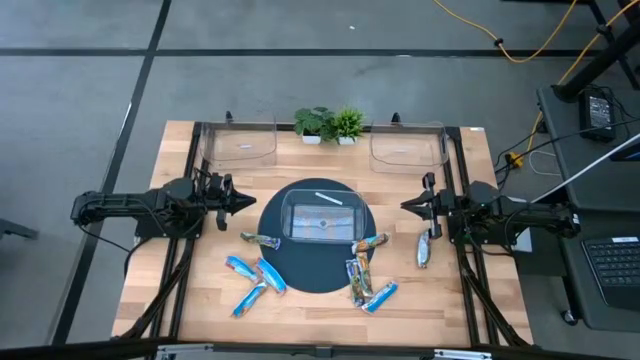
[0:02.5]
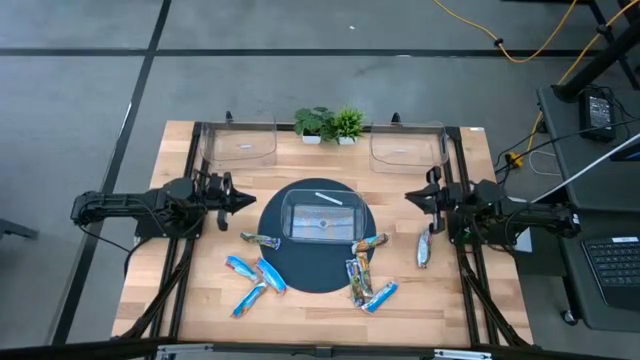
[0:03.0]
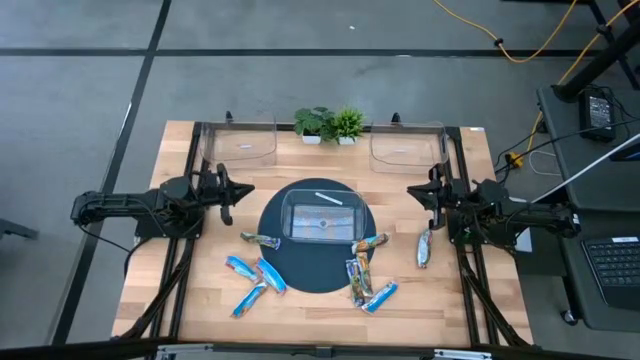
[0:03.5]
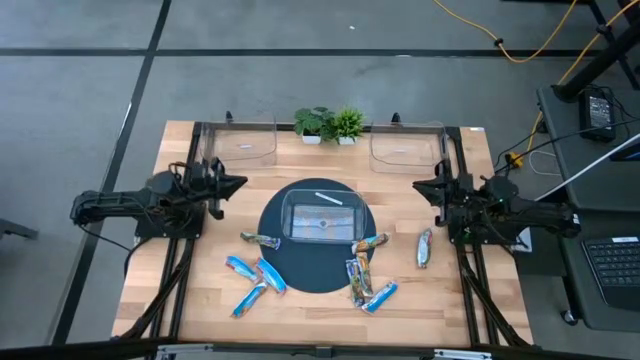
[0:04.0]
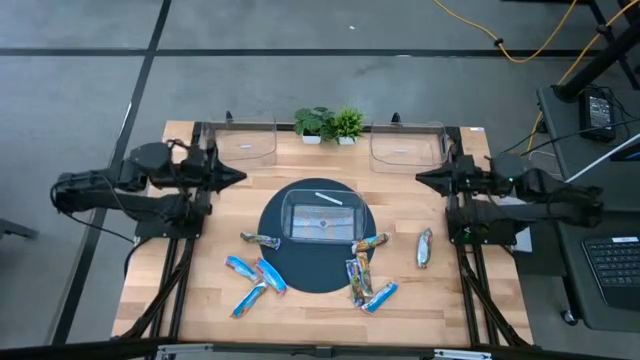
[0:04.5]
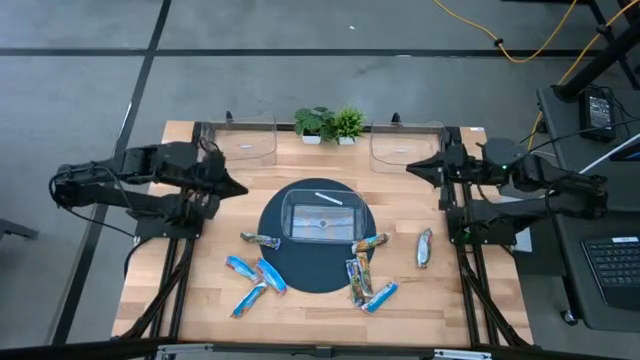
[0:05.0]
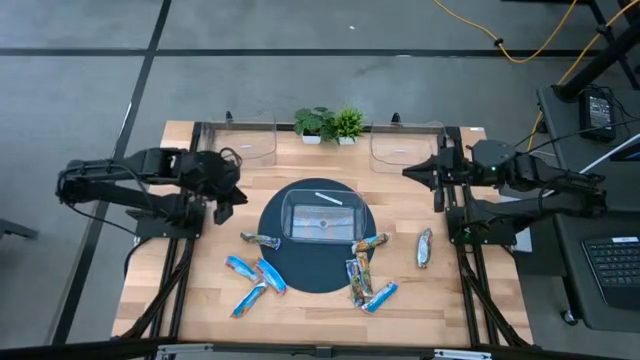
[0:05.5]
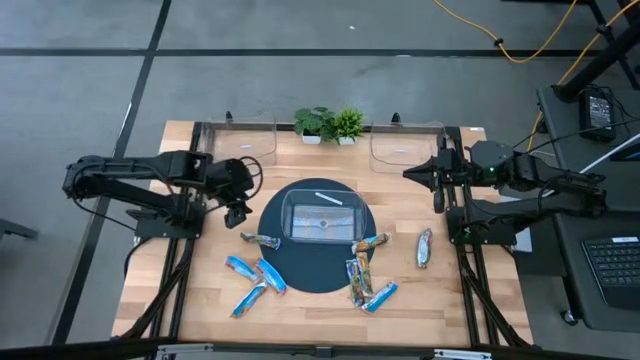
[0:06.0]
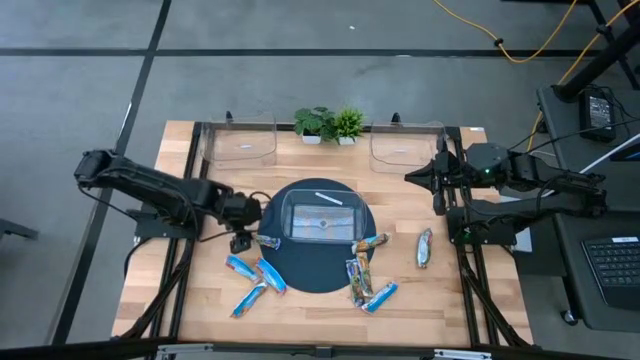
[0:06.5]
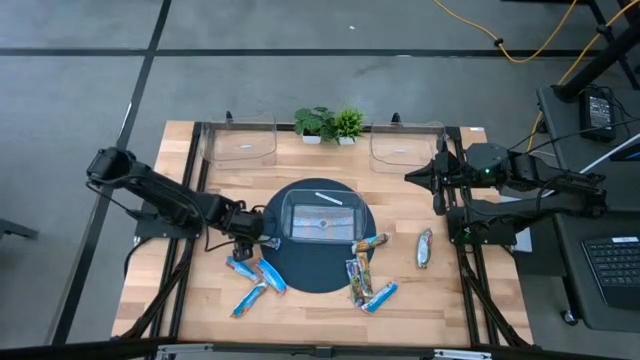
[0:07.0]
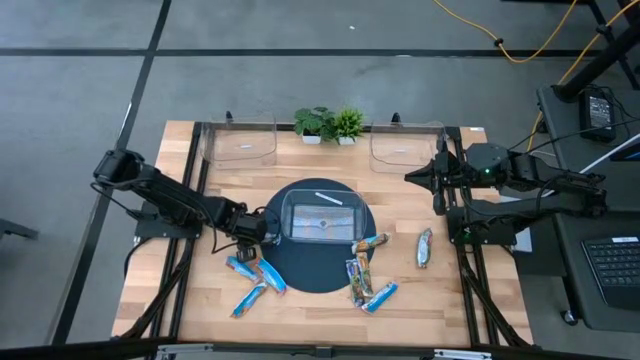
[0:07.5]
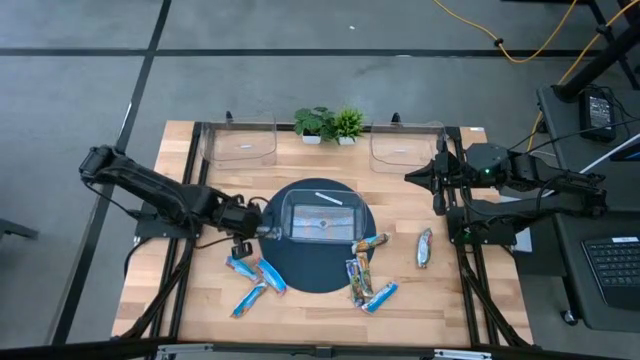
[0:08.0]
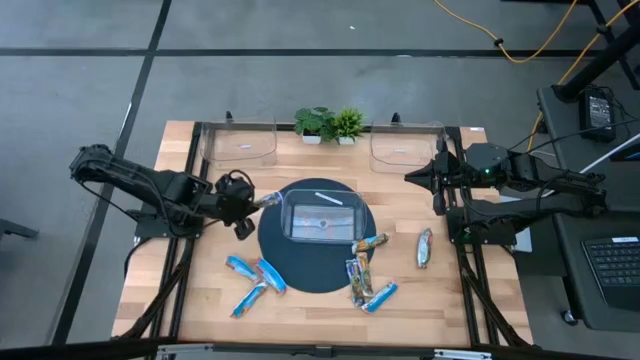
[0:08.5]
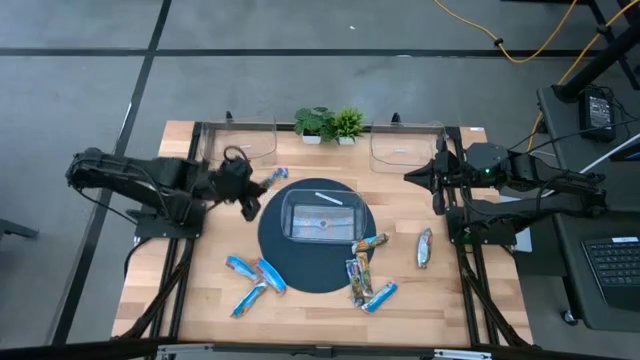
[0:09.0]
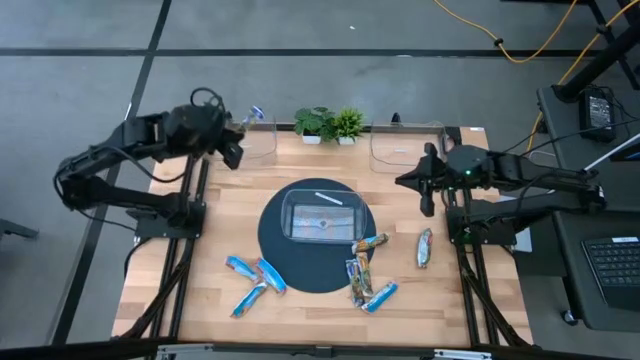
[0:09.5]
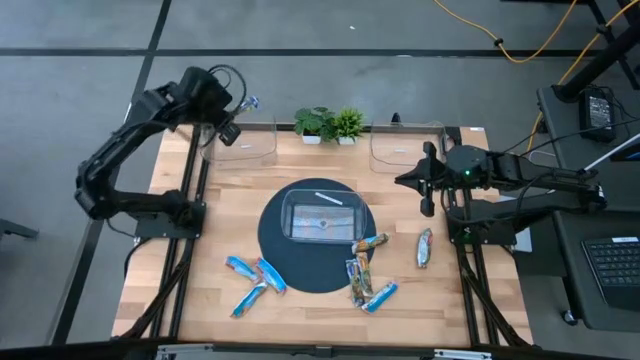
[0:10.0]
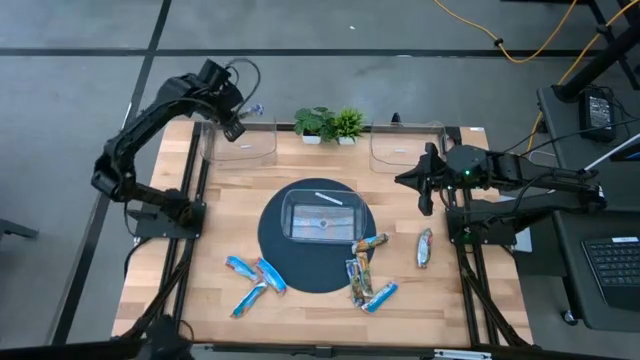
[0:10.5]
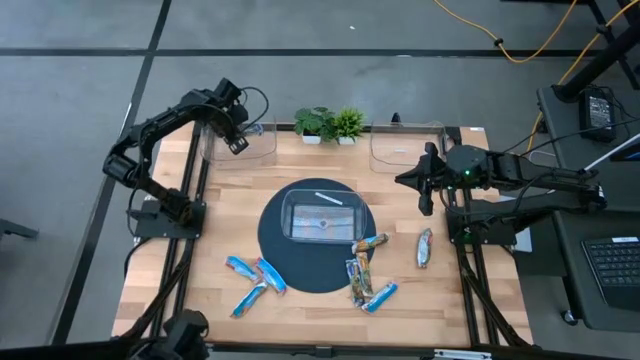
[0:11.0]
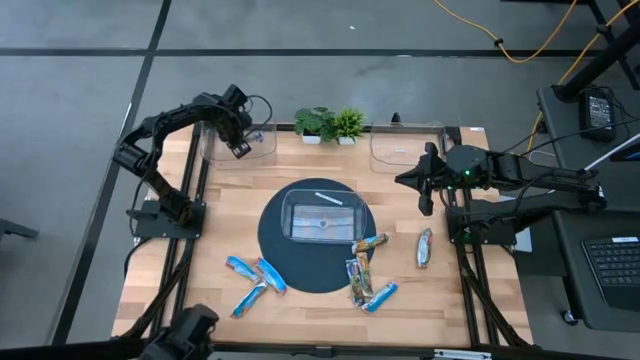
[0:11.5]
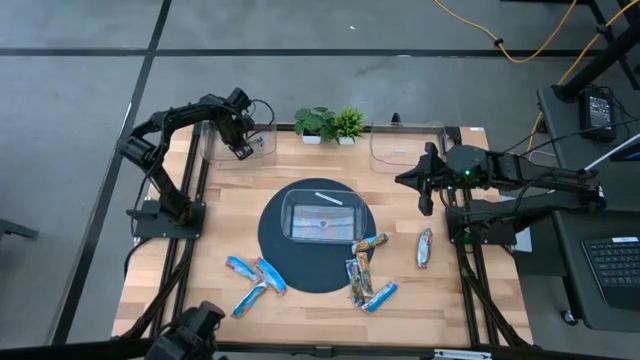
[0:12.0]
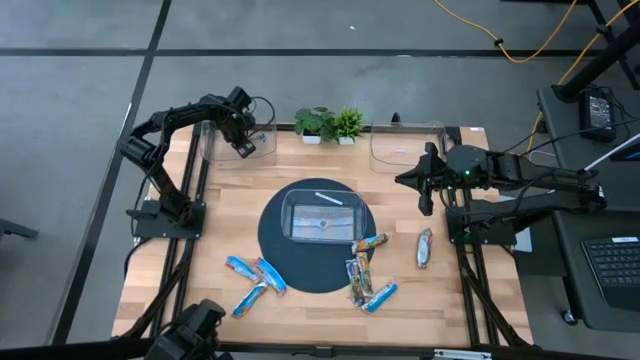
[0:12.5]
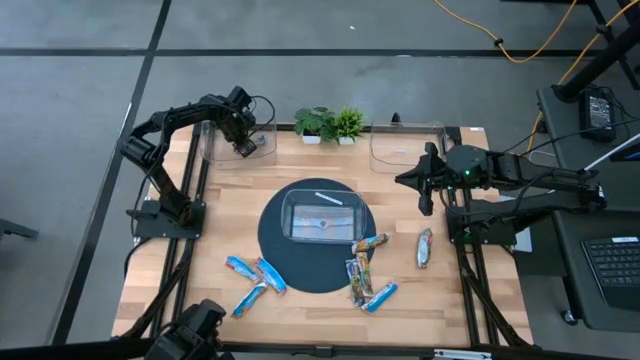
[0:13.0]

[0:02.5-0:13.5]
Task: Pick and place Granola Bars by type
Put the blue granola bar into the top left transparent bin

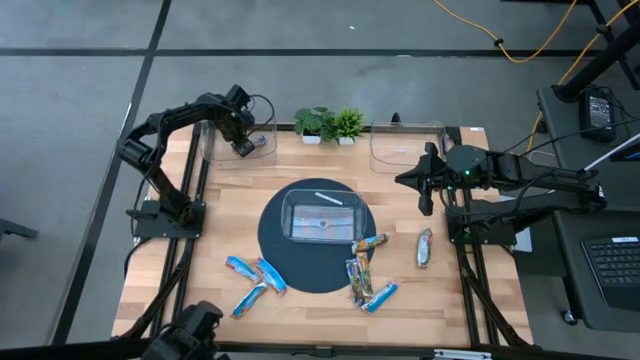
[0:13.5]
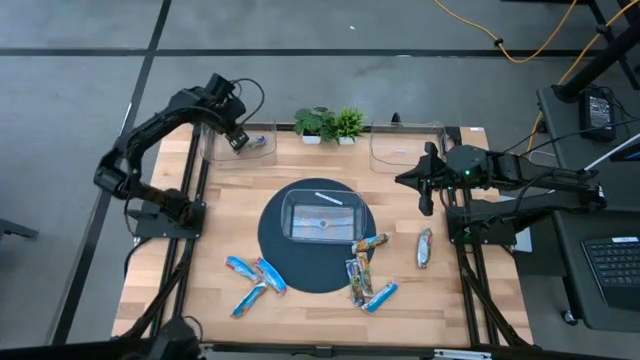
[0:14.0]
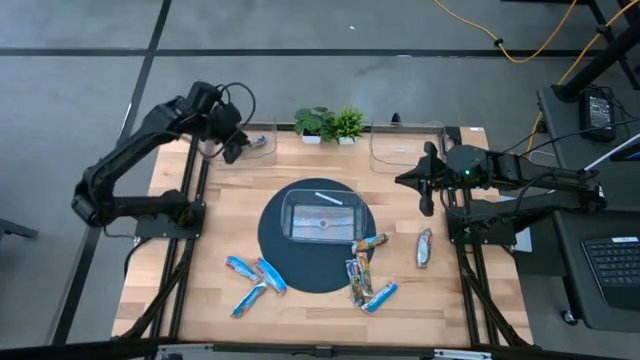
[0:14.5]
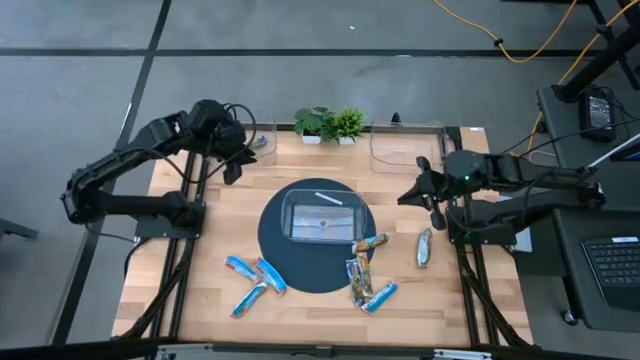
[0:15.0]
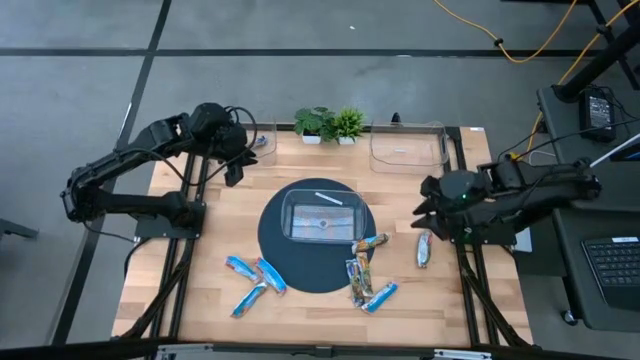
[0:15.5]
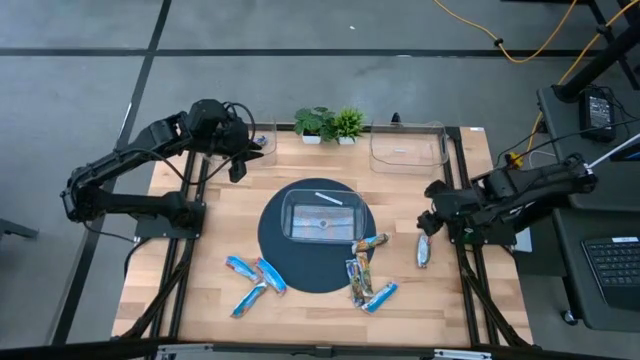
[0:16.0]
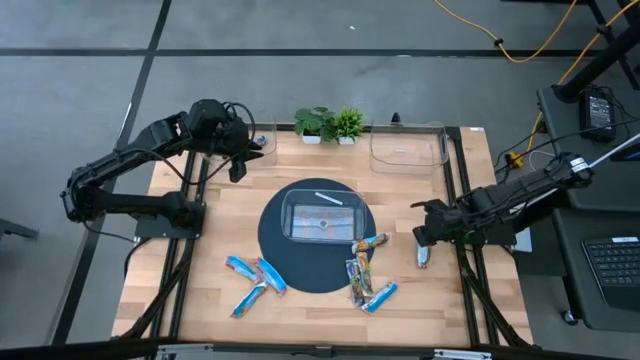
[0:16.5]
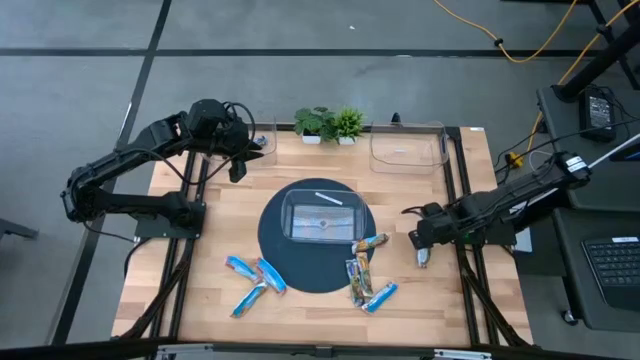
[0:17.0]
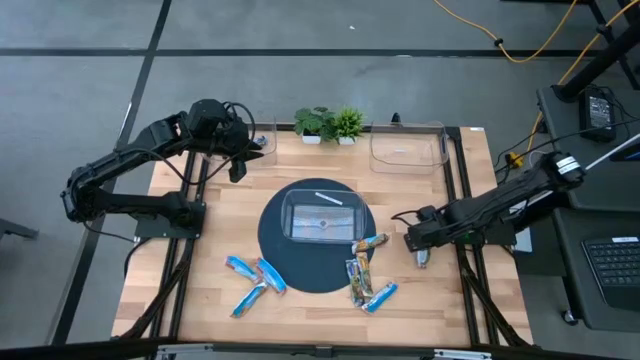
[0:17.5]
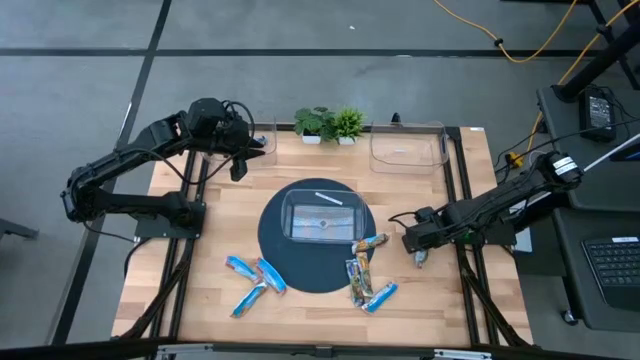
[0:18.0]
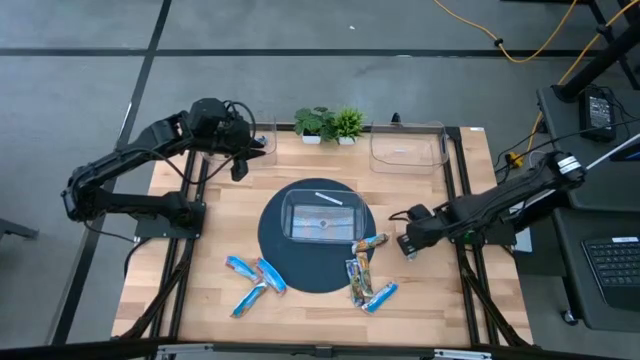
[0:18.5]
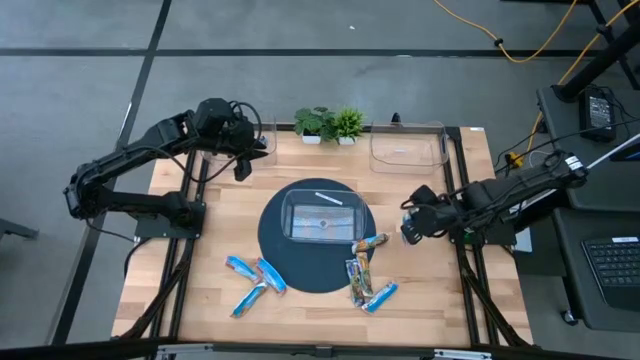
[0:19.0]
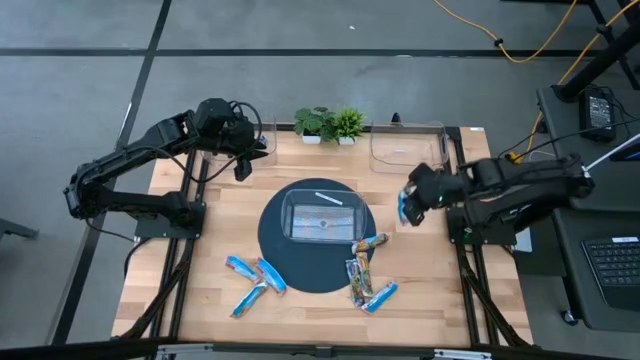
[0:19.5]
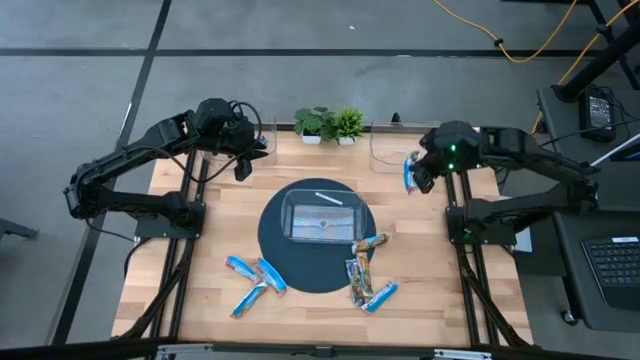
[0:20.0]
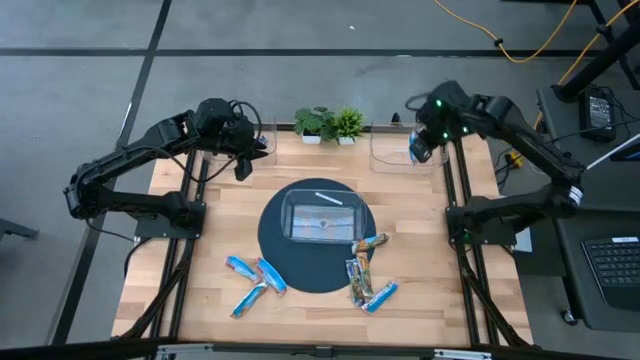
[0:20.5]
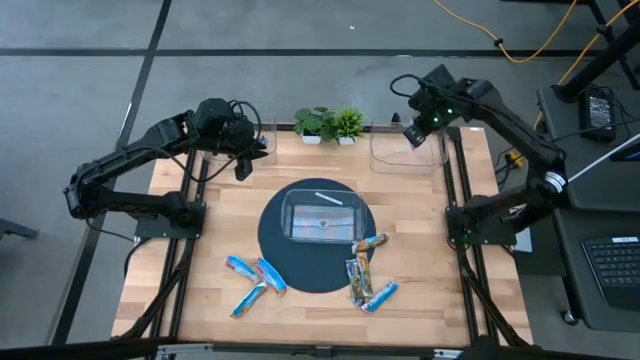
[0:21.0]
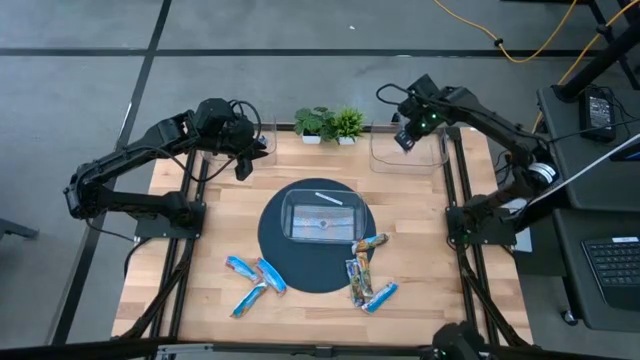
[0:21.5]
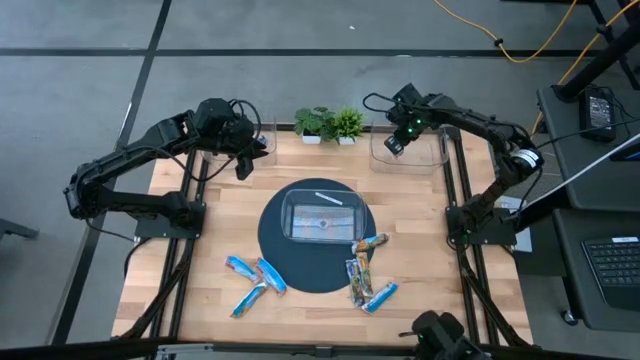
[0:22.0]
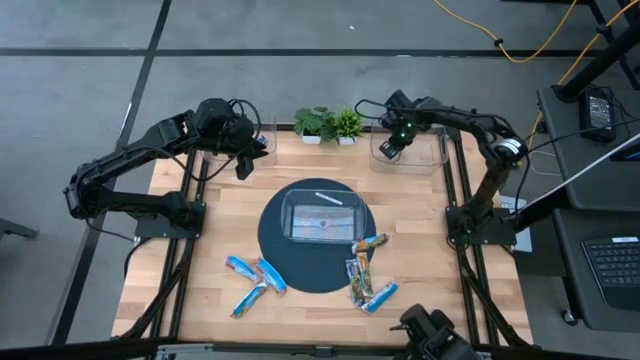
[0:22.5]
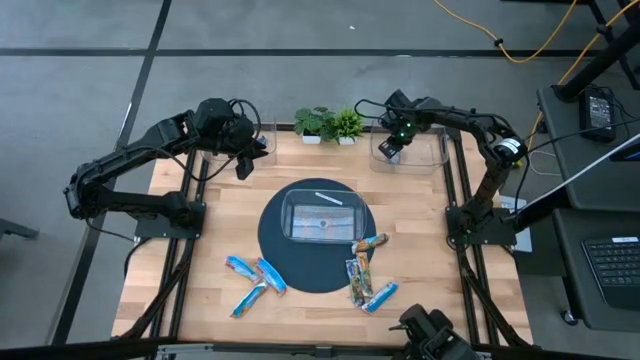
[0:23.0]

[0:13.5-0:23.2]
Put the red granola bar into the top right transparent bin

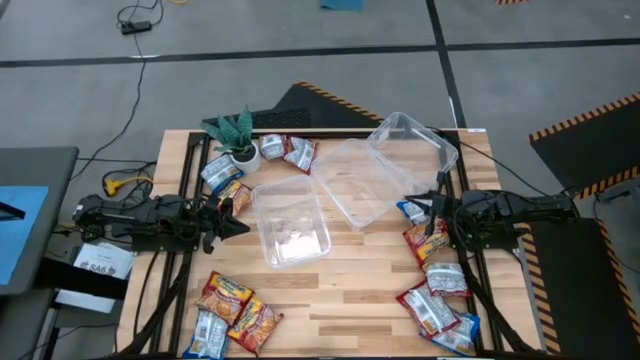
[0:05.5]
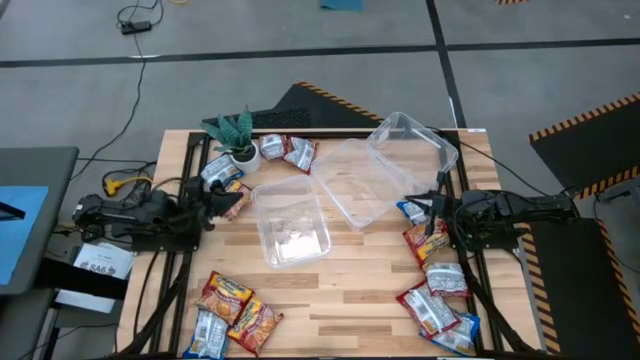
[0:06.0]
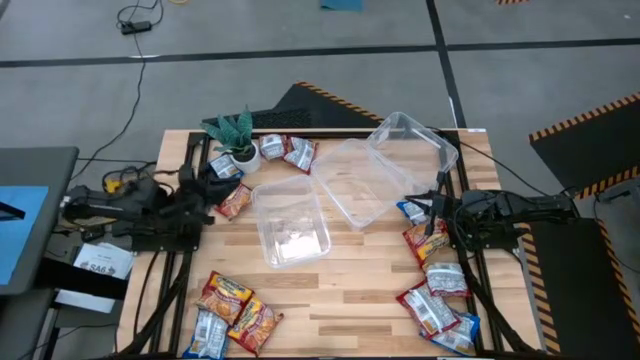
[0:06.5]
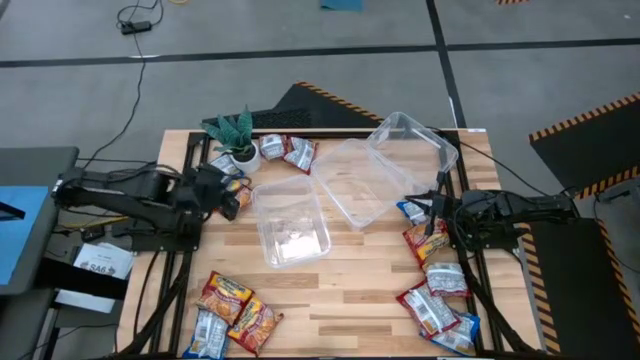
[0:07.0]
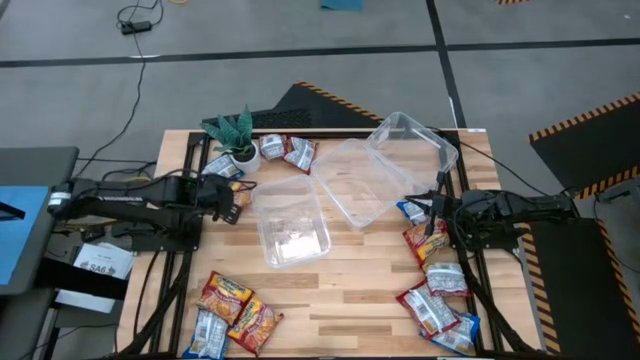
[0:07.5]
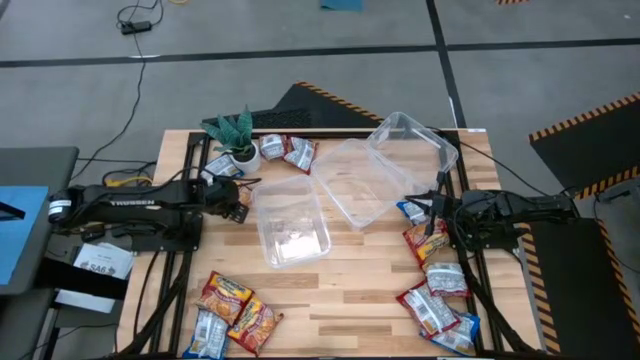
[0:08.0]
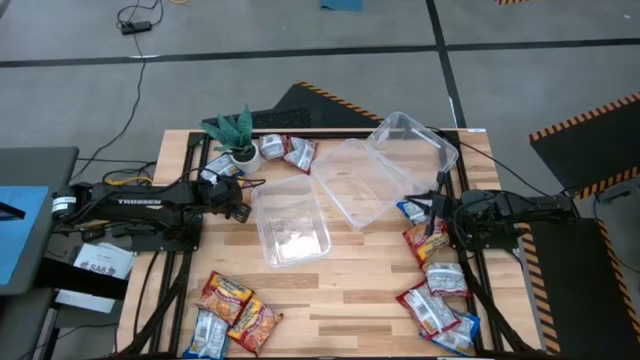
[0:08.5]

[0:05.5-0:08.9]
Task: Sort Maruchan noodles
Put the red noodle pack into the bottom bin
